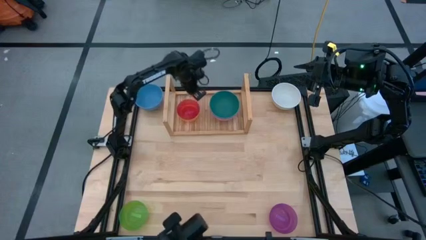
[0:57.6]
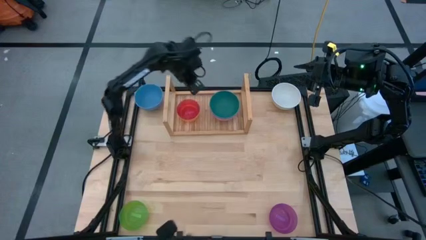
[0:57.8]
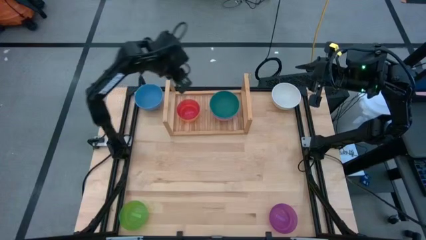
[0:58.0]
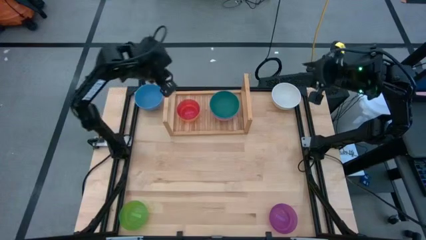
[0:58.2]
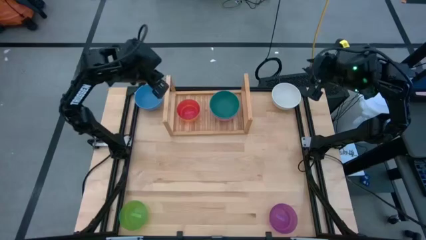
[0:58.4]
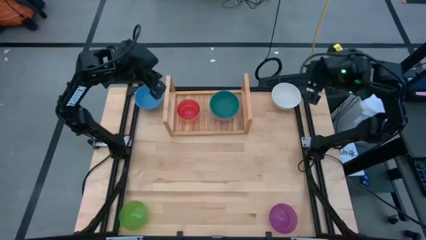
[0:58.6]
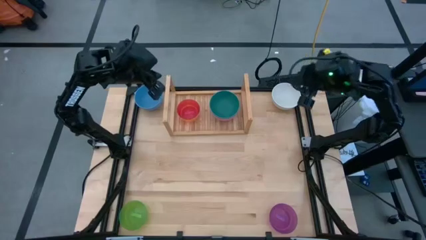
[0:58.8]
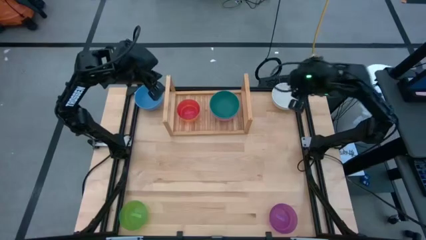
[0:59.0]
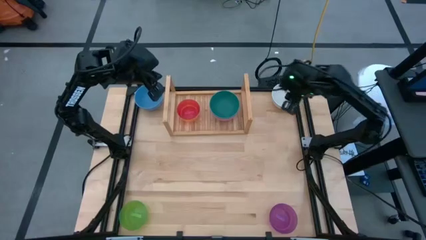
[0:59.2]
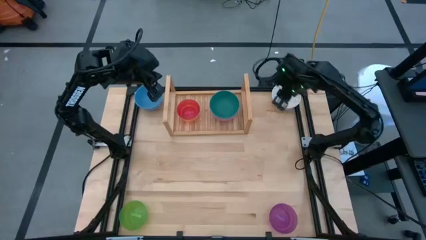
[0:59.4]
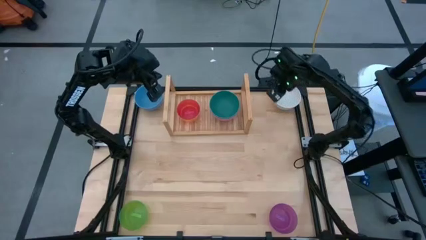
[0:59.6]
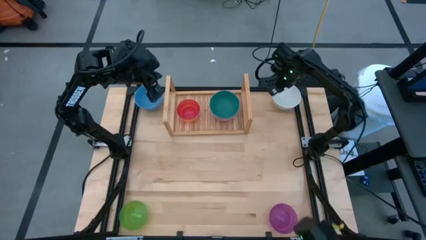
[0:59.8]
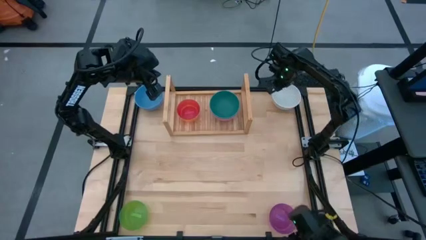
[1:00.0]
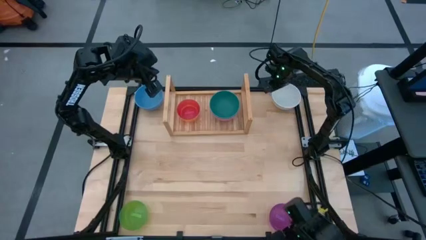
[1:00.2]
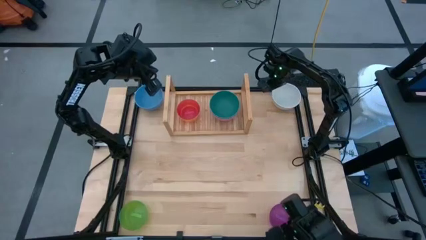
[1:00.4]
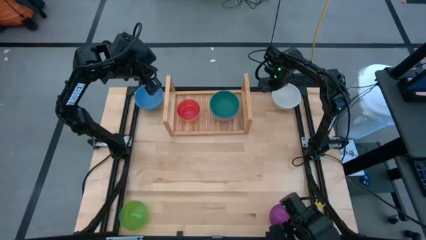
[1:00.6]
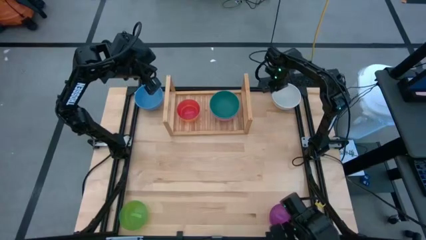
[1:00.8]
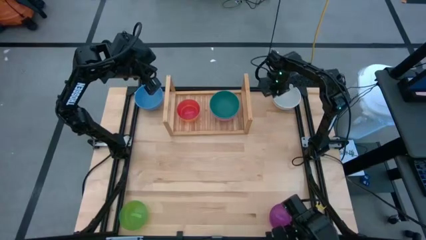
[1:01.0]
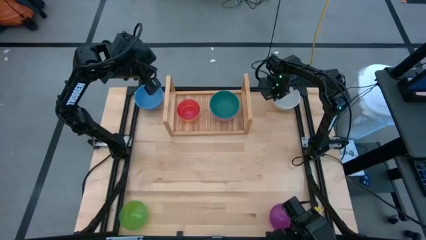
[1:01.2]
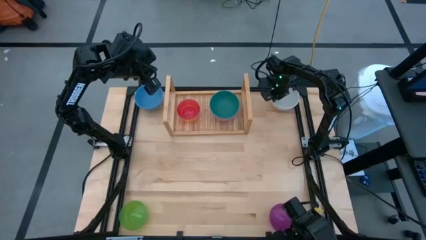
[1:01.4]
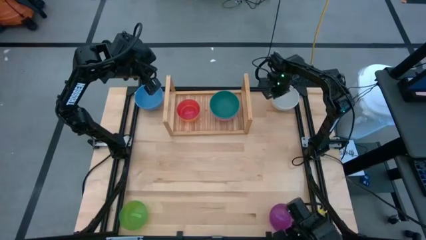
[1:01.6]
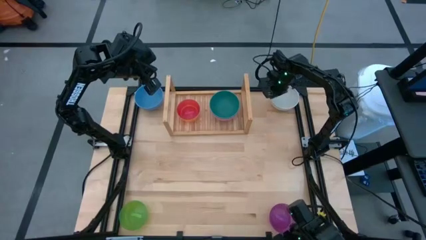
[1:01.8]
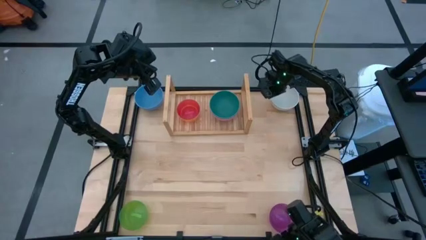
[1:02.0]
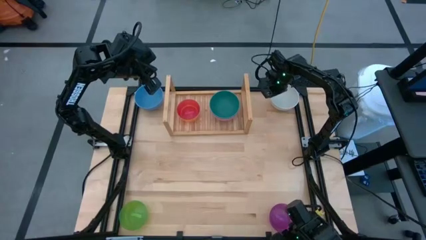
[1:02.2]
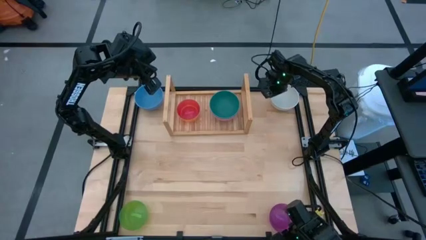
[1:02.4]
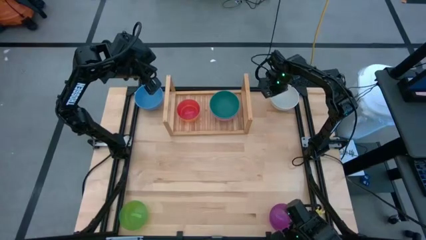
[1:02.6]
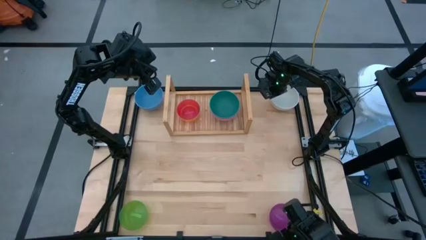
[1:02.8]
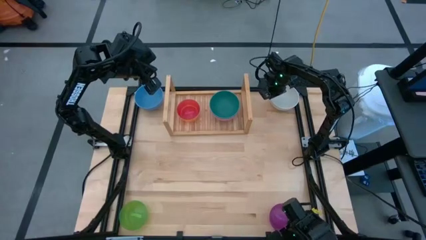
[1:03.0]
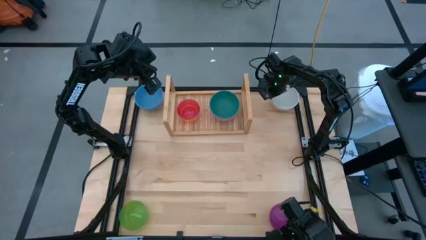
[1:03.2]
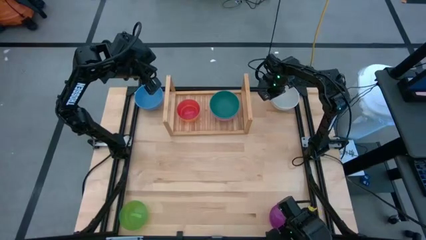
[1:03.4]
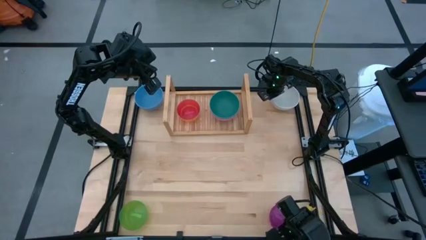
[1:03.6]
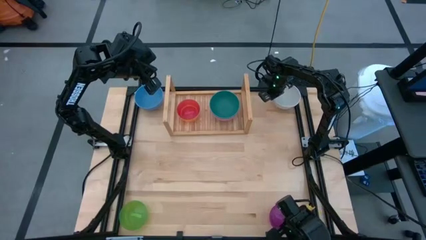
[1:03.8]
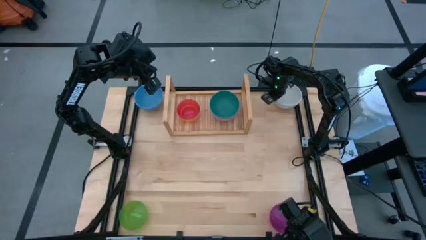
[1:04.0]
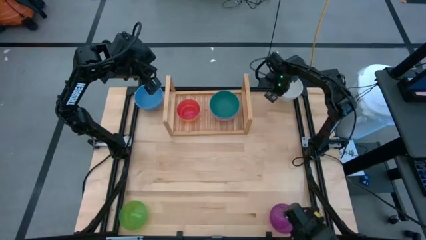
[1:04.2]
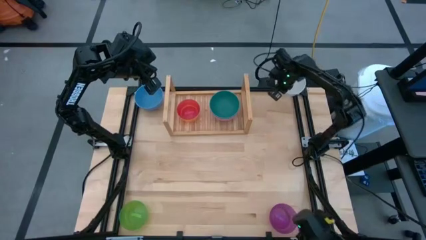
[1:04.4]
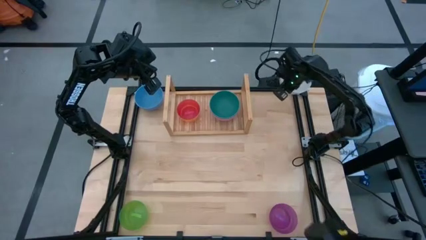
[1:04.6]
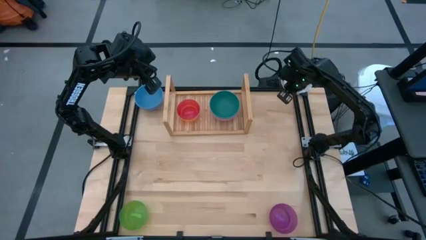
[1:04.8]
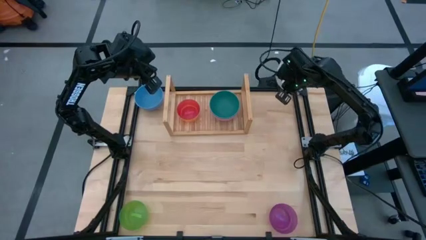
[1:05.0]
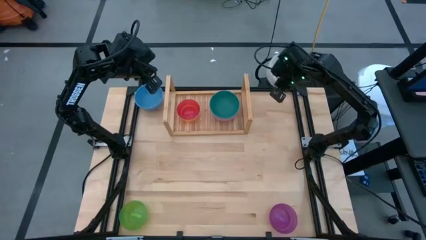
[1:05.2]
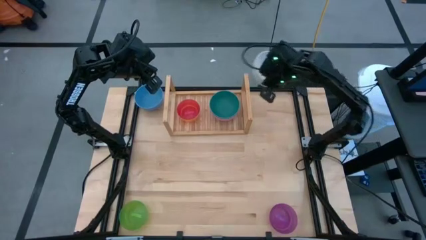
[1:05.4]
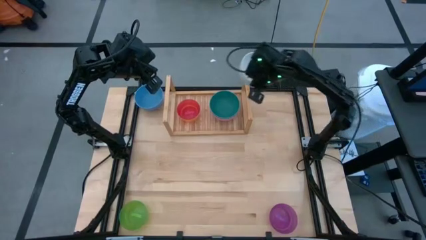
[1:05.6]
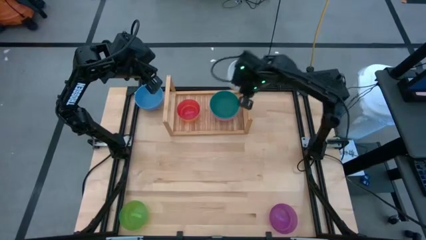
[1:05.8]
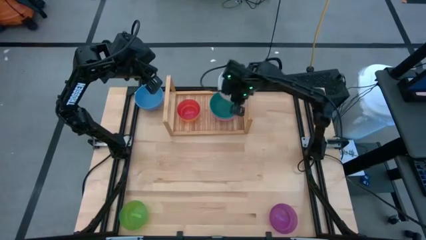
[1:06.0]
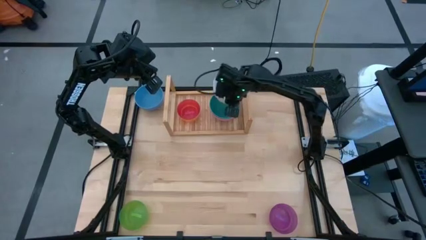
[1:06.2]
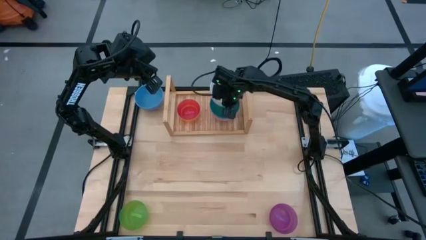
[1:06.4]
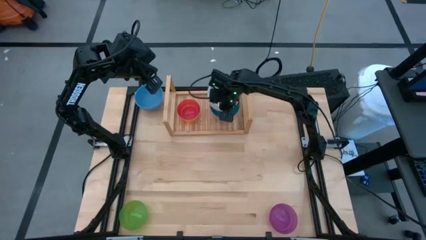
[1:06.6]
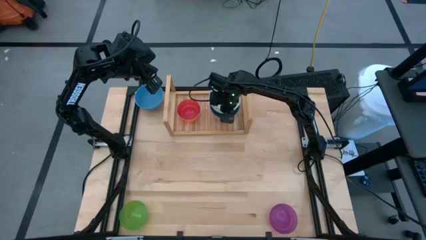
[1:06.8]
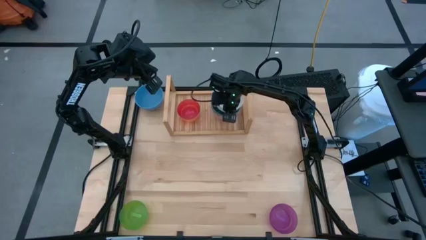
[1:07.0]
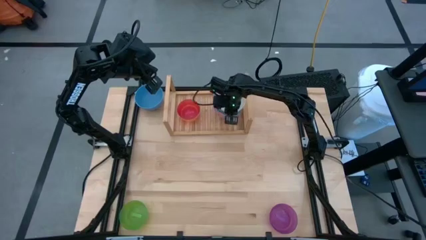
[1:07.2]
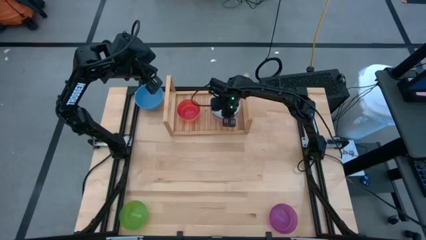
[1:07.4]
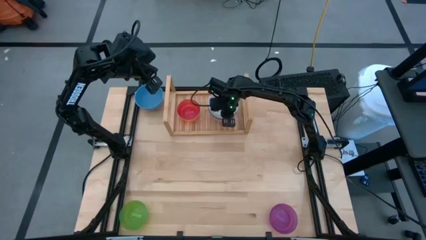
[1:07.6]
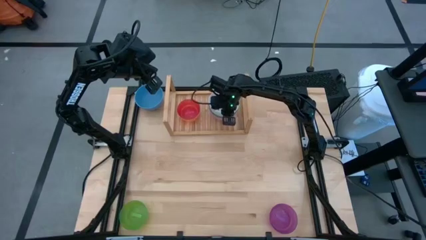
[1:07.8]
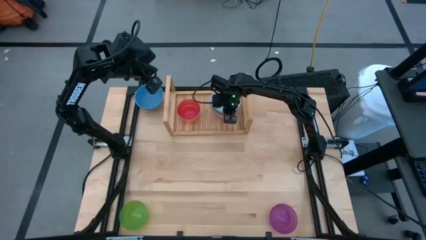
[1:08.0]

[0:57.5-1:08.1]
Task: Place and stack bowls onto a shelf
Stack the white bowl onto the blue bowl

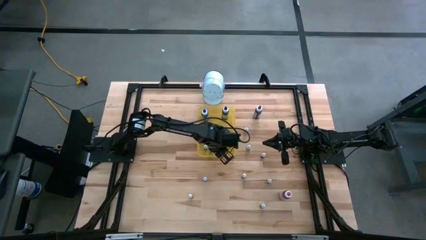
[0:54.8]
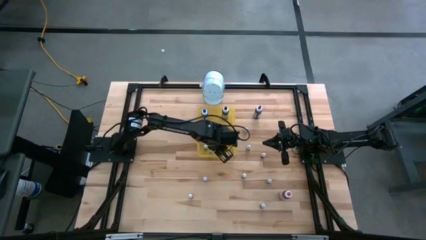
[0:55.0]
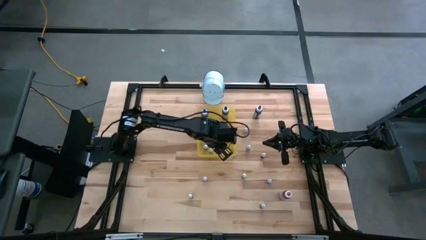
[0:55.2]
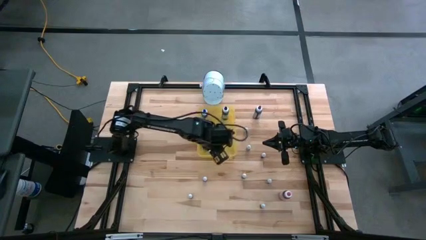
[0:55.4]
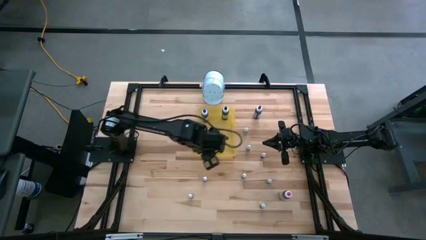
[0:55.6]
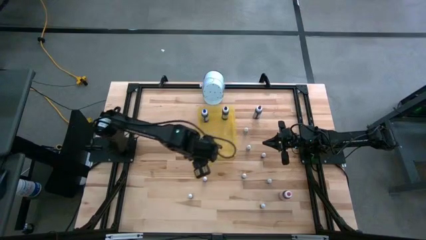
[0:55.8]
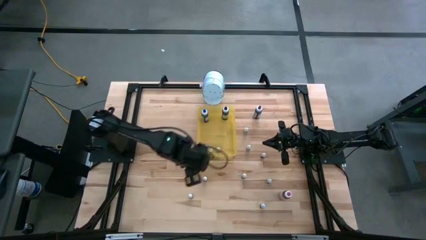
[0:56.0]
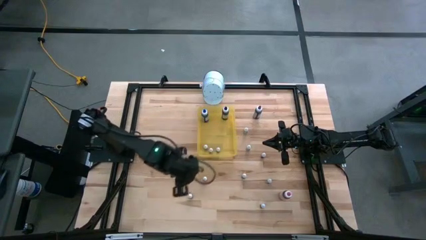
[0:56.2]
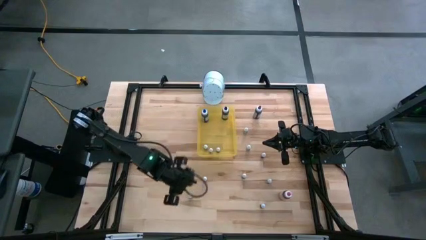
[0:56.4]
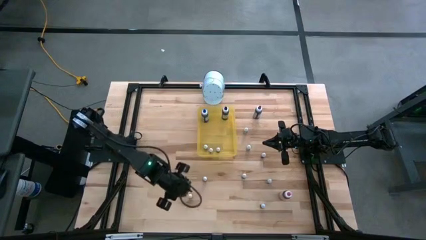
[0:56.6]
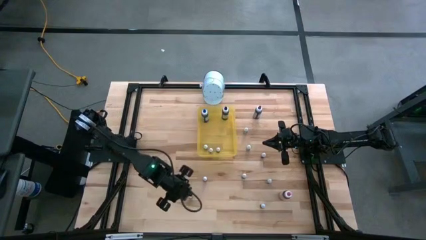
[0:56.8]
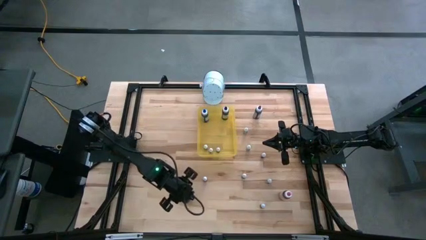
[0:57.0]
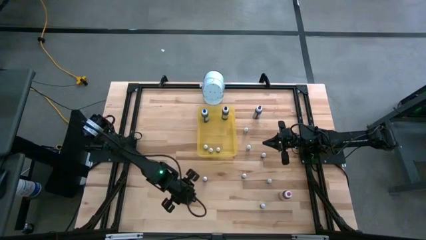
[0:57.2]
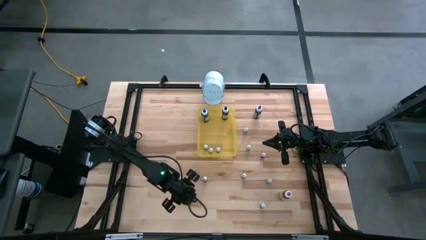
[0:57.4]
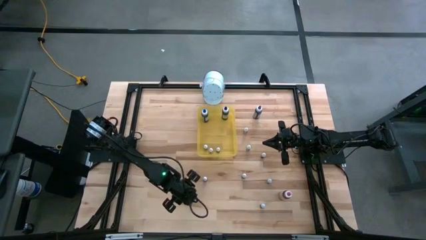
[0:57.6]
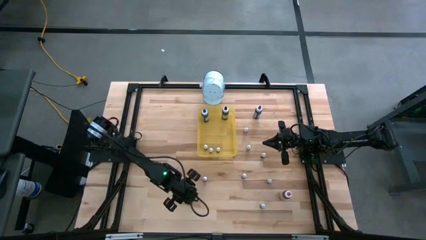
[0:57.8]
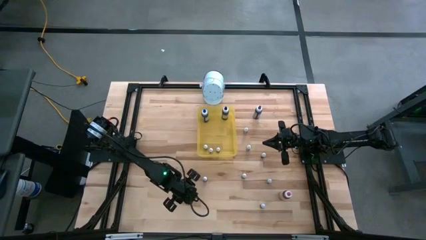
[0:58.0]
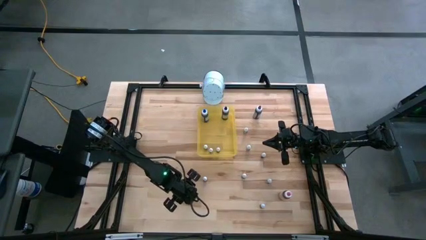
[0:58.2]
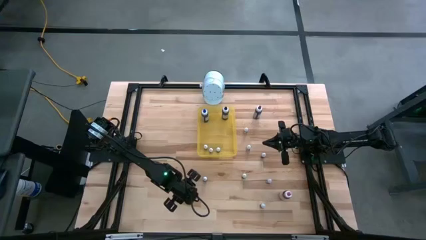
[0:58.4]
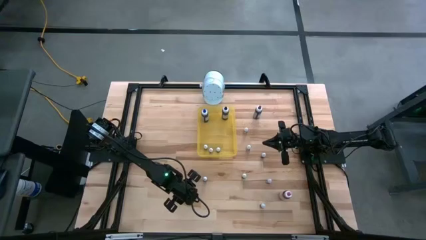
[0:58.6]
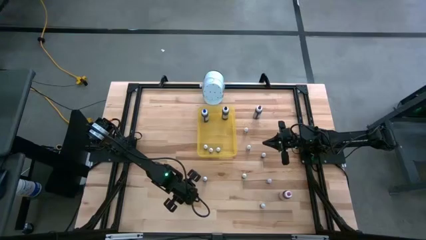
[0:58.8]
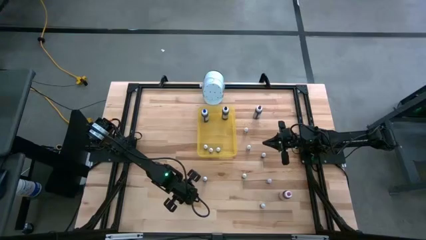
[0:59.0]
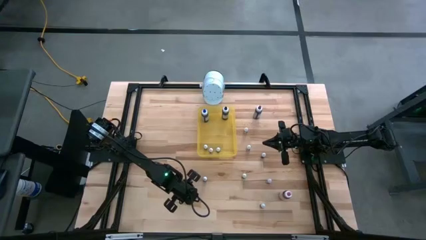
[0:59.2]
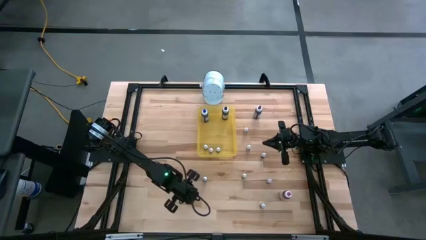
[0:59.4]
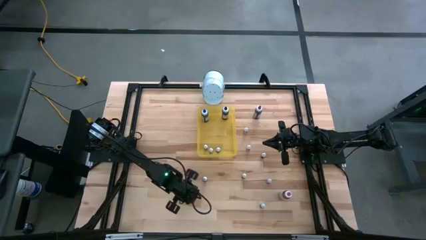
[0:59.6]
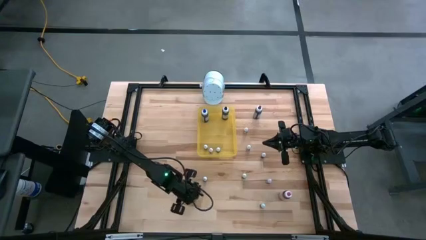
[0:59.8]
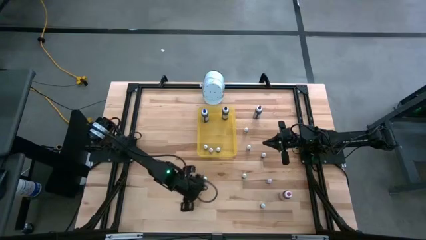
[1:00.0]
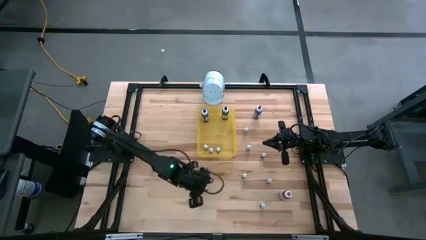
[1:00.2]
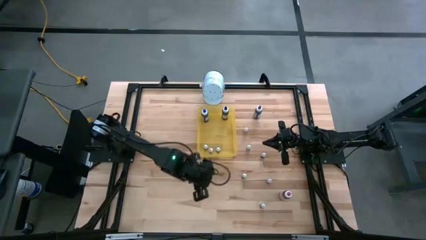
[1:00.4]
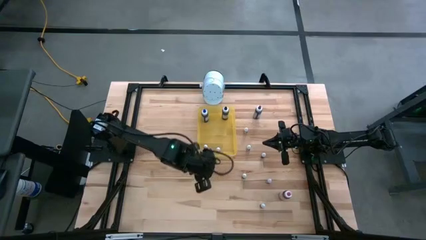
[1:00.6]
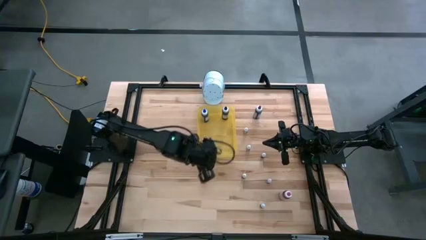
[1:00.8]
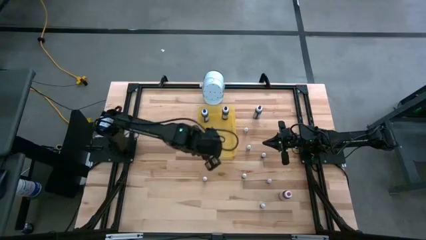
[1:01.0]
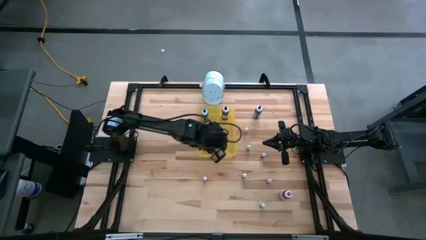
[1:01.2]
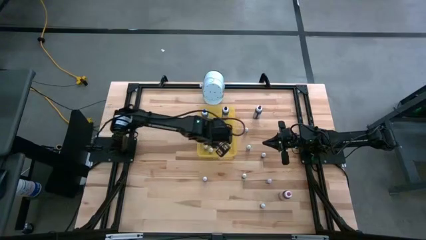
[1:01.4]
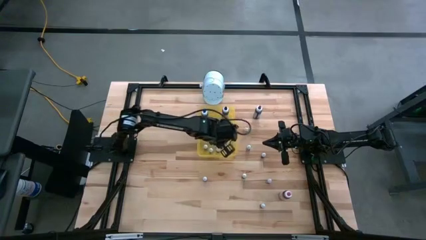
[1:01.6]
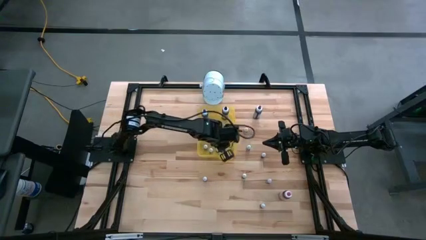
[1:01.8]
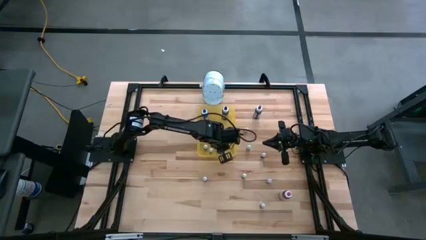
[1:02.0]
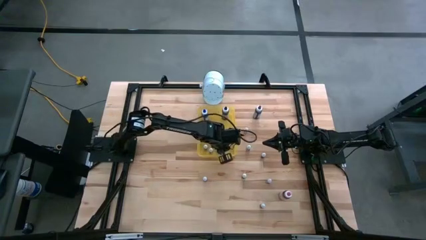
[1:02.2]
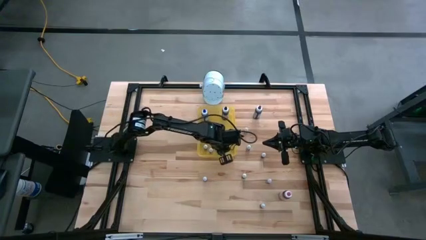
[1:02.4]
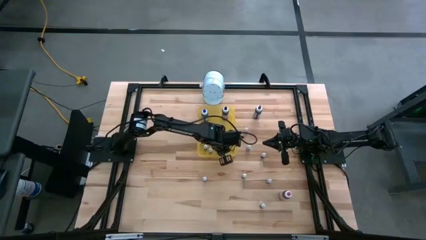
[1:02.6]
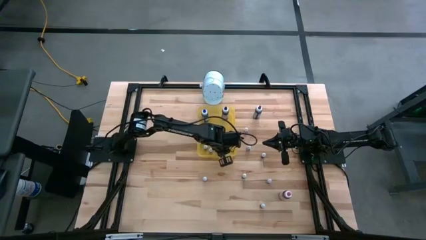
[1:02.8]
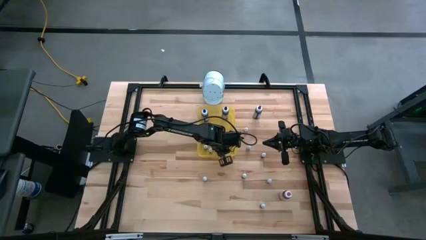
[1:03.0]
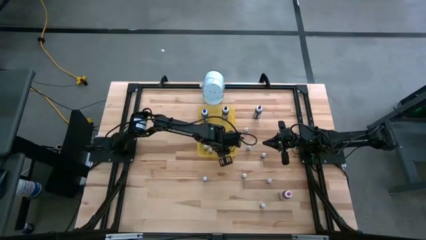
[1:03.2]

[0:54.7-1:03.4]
Task: Pick & Place food coloring
Put the small black food coloring bottle in the yellow transparent bin
